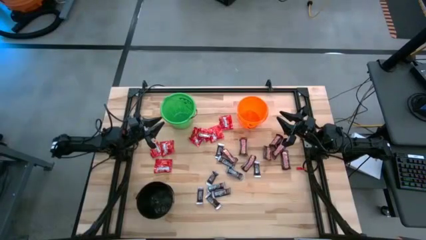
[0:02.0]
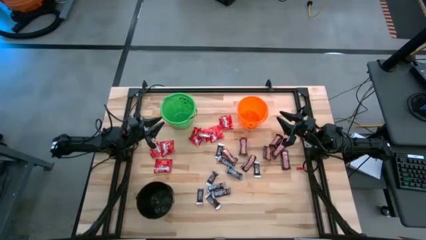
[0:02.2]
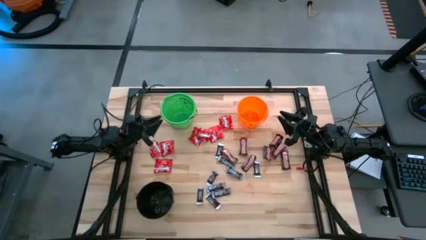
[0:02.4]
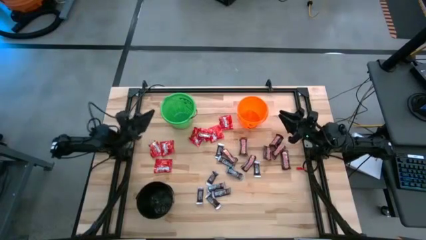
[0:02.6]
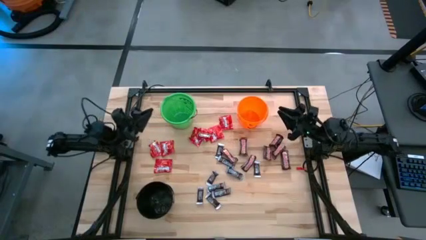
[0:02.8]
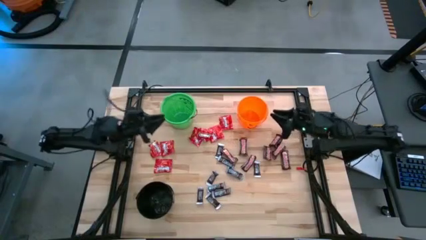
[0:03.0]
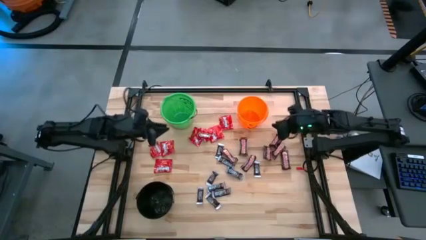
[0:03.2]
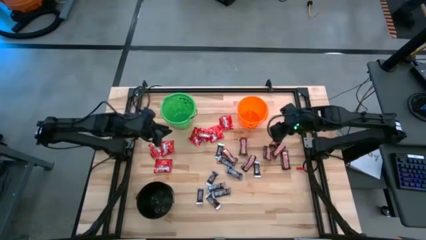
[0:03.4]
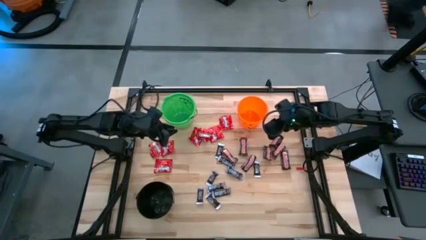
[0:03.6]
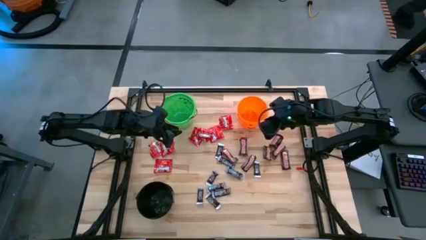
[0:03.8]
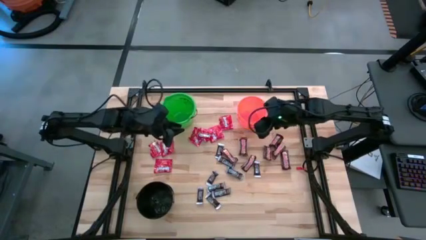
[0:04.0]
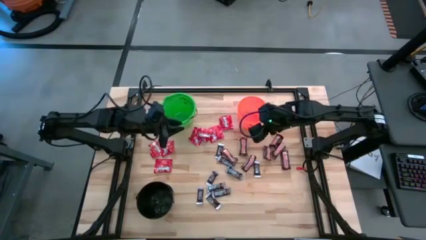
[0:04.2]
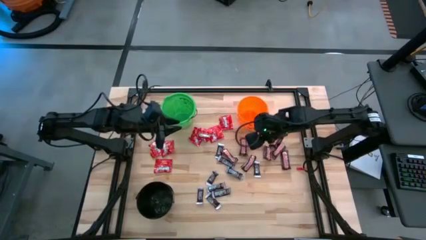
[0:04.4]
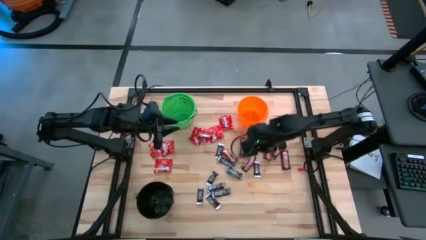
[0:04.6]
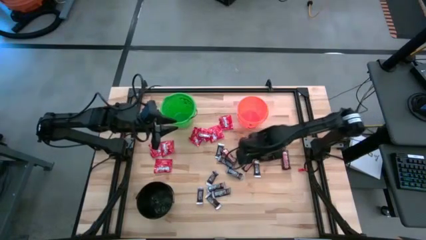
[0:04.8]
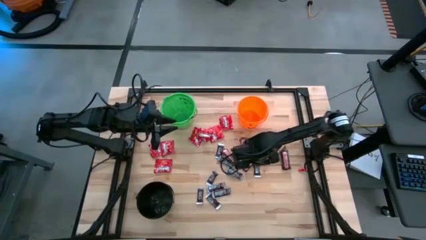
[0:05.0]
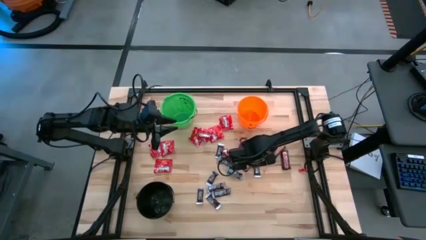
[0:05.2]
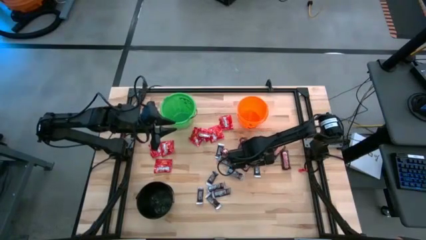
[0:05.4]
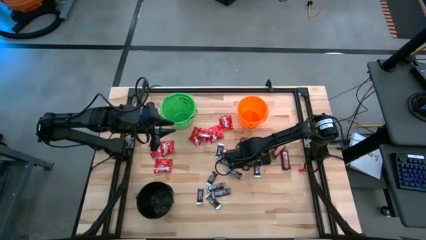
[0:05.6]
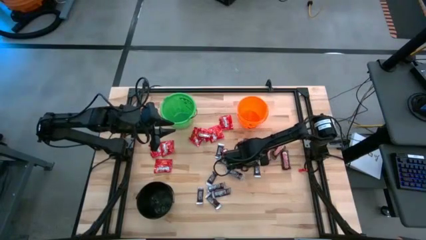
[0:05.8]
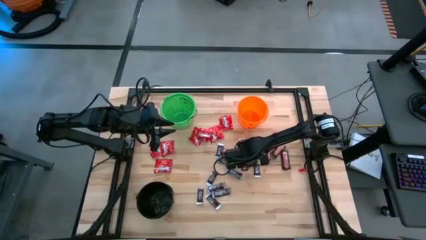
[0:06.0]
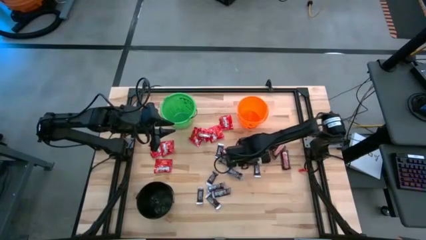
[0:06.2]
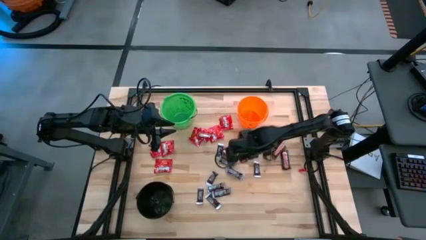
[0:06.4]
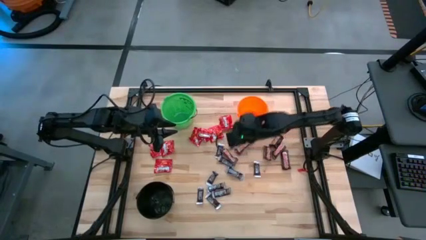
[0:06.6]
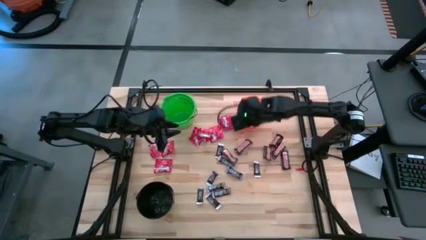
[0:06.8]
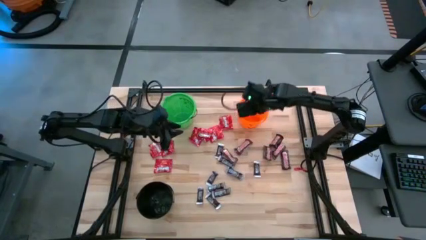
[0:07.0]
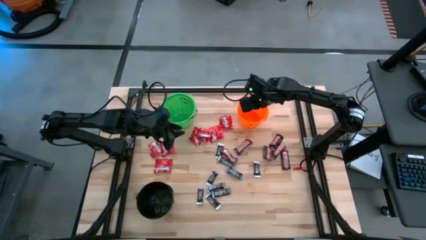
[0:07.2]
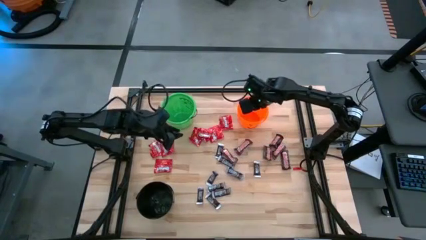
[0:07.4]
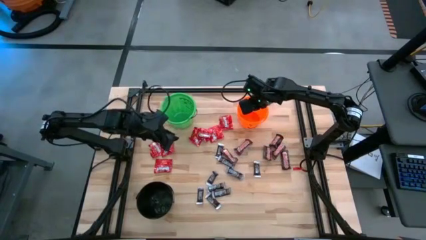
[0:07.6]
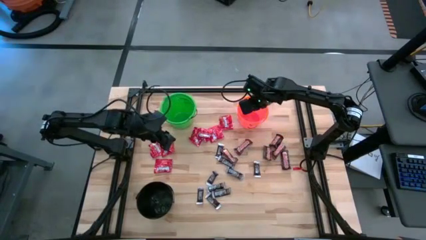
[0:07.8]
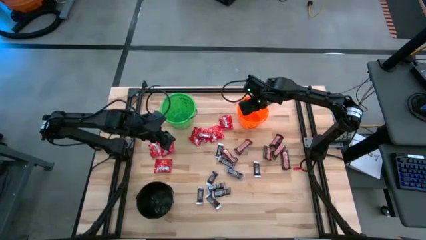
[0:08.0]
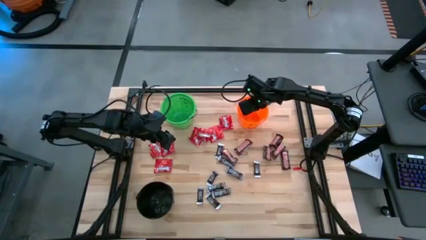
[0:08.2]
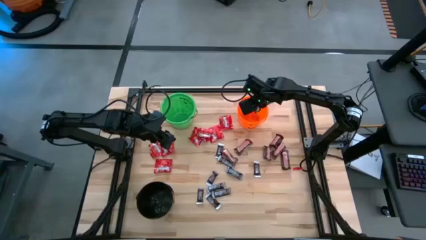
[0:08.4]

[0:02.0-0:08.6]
Task: Sort candy
Put the brown chocolate into the orange bucket

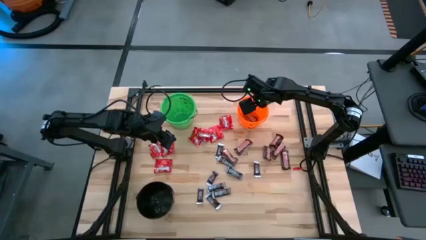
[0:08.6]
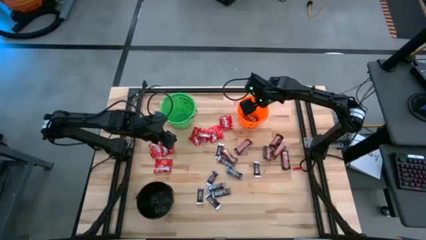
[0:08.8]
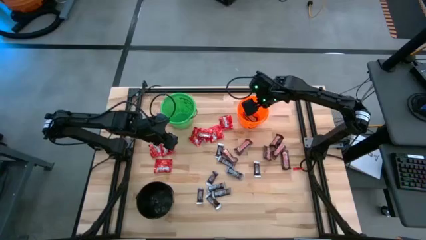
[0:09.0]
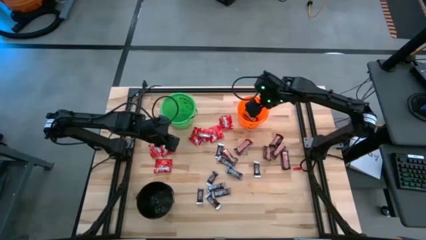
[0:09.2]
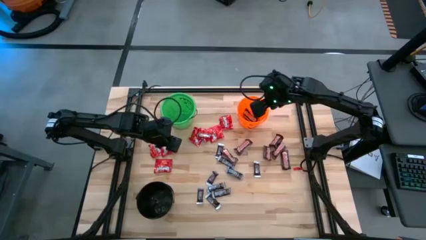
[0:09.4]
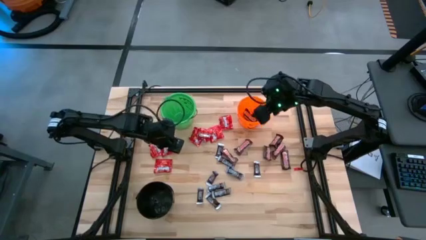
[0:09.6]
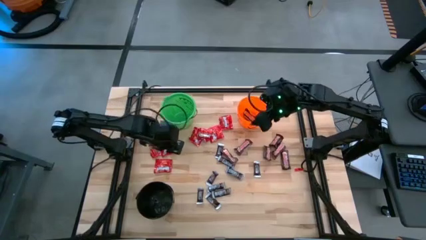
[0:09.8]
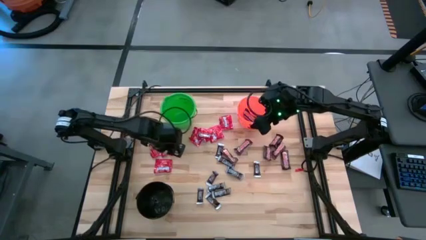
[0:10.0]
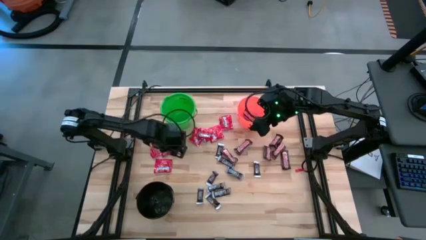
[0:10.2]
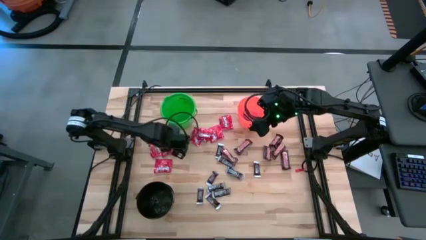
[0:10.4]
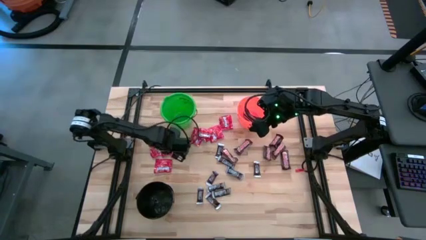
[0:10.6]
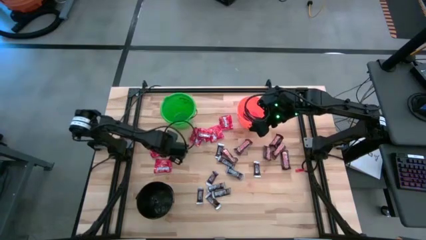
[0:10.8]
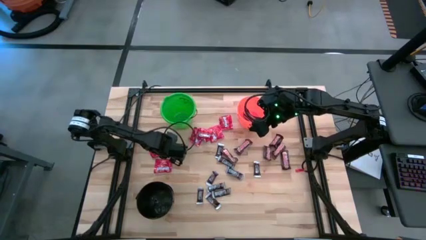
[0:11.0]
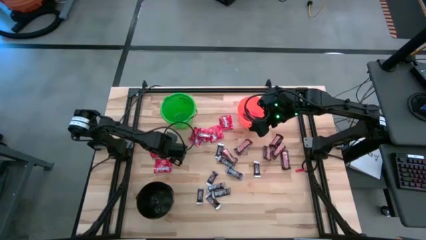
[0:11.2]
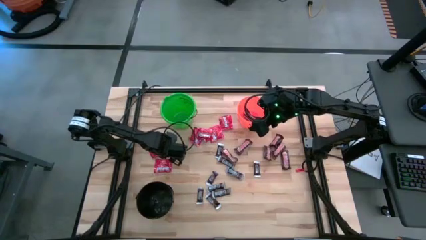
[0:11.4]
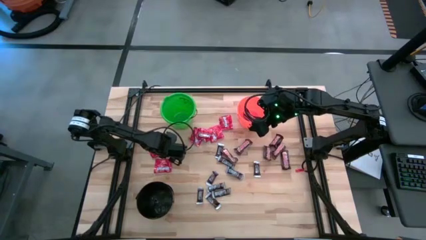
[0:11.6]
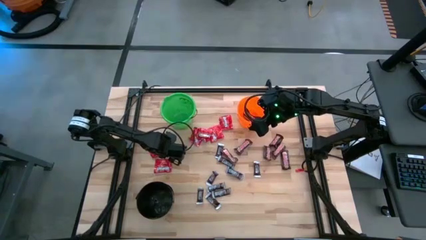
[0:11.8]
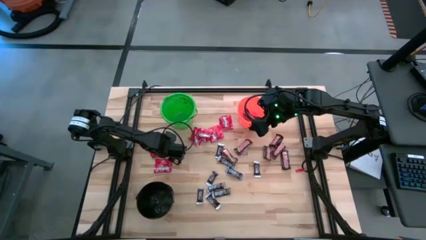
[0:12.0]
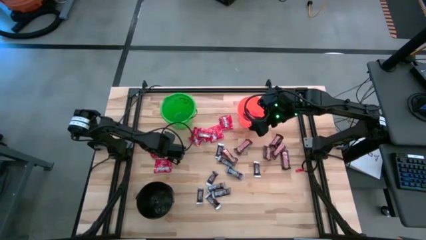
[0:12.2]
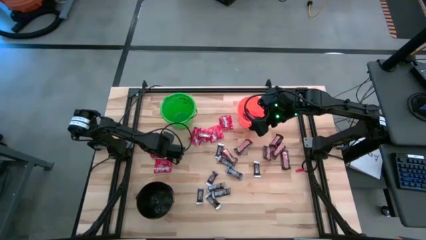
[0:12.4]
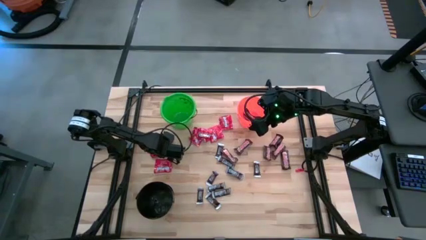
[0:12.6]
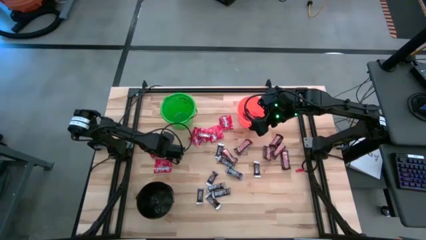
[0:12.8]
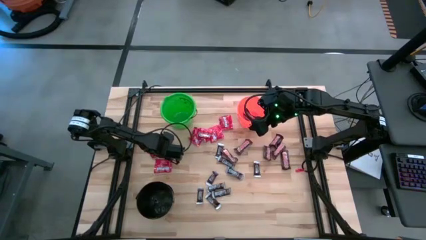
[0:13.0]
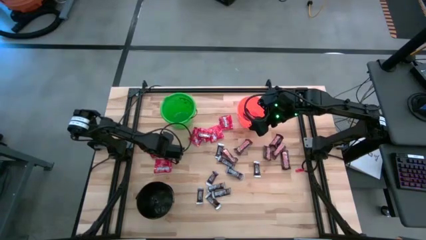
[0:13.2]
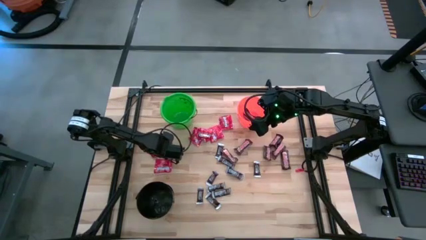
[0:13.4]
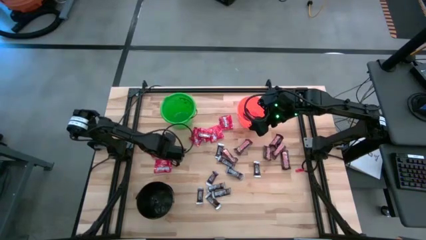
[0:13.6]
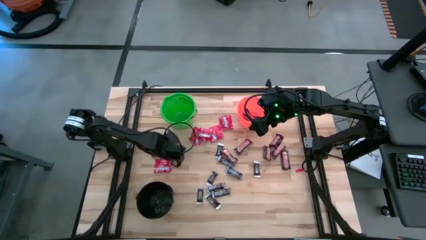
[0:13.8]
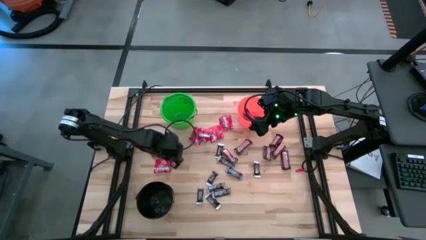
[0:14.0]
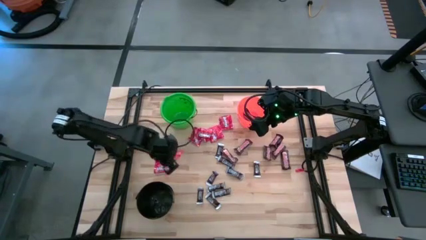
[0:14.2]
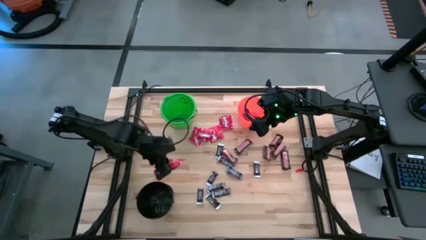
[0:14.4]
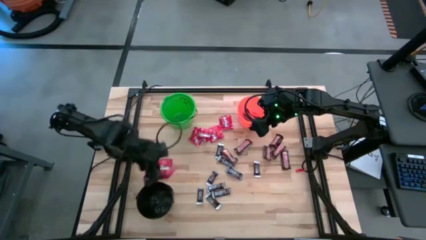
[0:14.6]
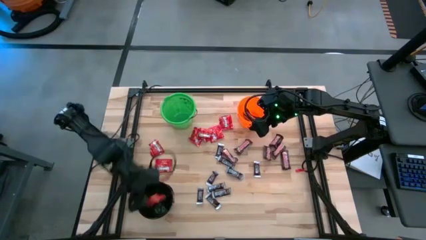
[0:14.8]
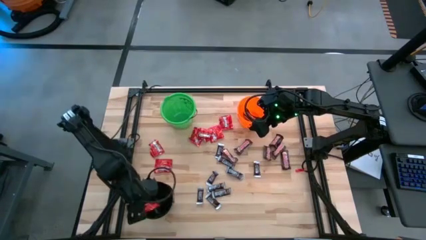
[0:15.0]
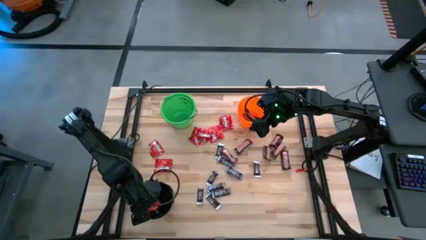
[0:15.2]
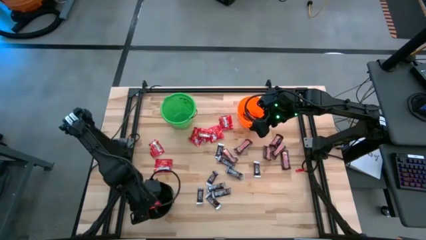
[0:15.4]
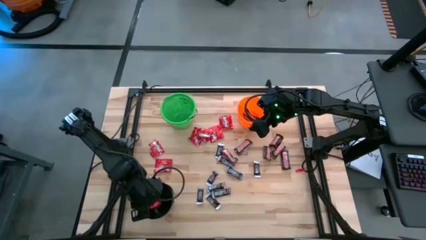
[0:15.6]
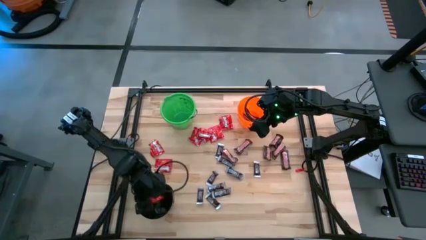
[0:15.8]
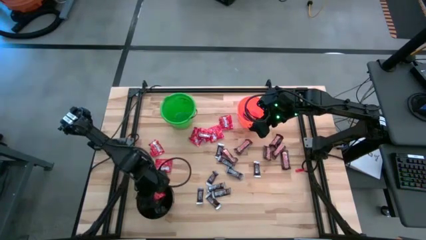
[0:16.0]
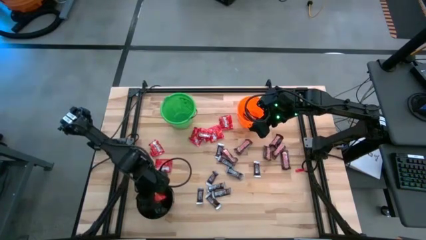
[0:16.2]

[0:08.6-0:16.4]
Put the red candy into the black bucket

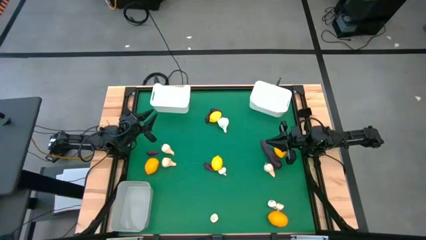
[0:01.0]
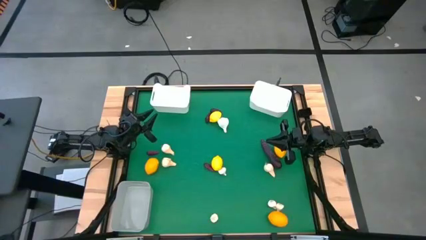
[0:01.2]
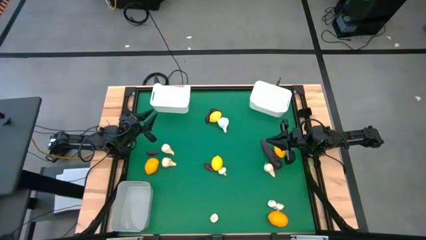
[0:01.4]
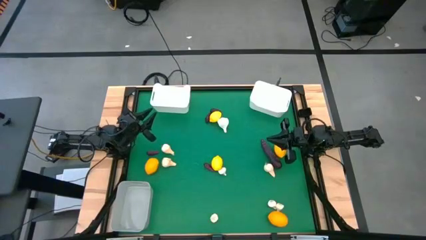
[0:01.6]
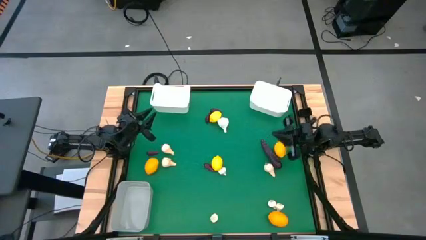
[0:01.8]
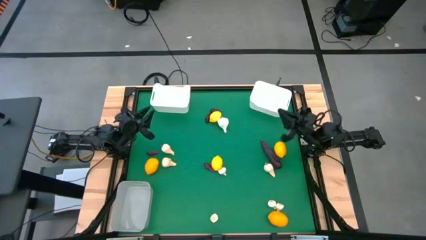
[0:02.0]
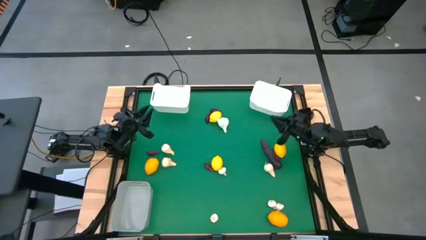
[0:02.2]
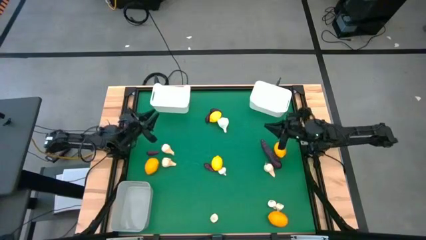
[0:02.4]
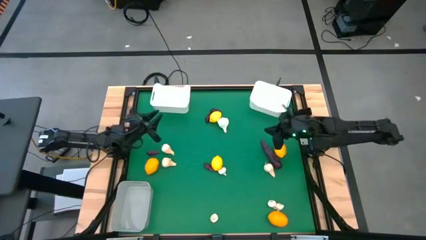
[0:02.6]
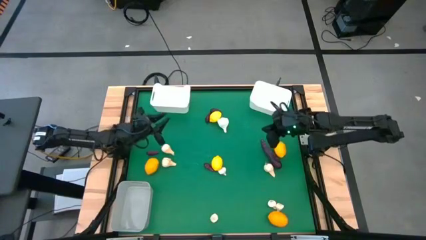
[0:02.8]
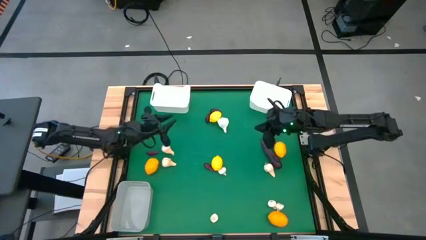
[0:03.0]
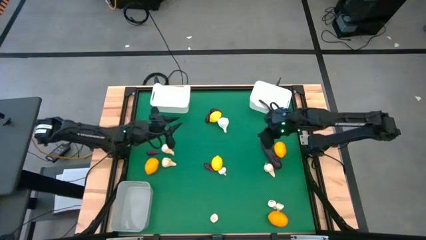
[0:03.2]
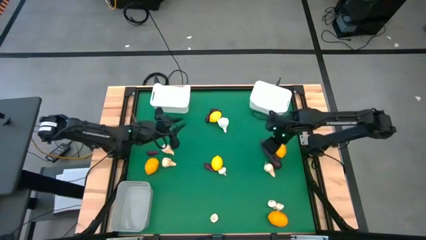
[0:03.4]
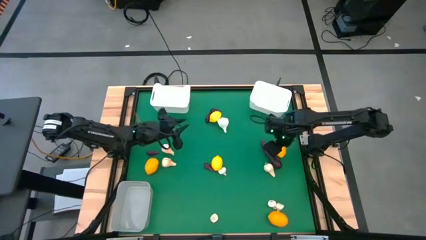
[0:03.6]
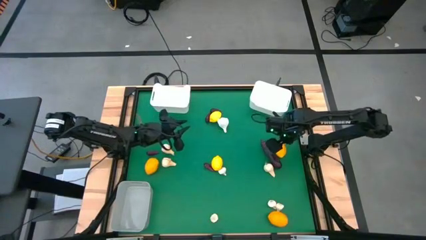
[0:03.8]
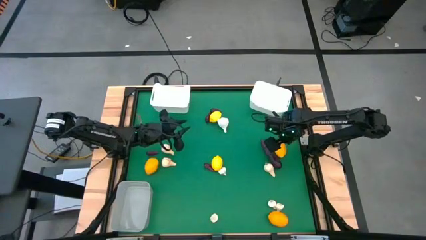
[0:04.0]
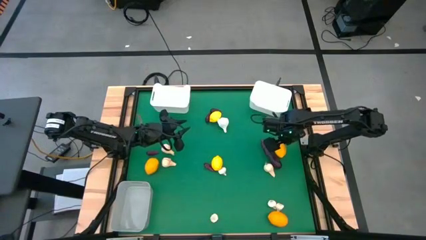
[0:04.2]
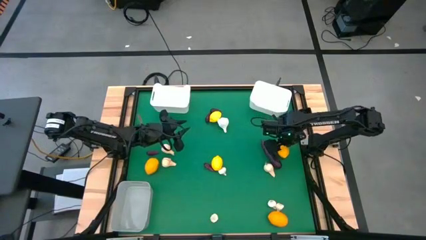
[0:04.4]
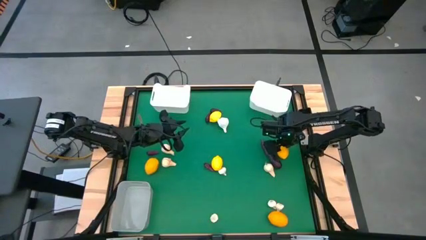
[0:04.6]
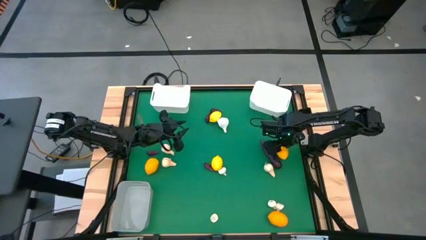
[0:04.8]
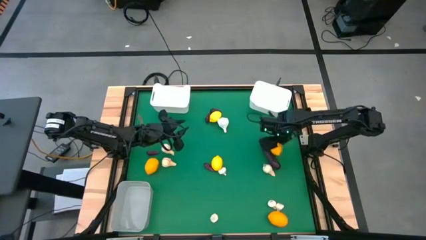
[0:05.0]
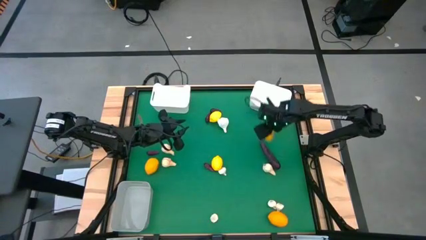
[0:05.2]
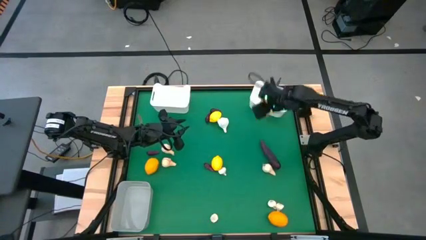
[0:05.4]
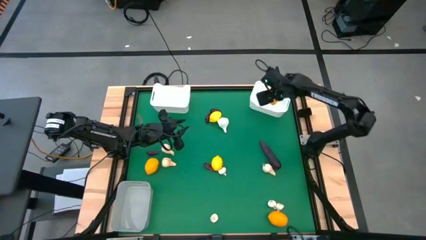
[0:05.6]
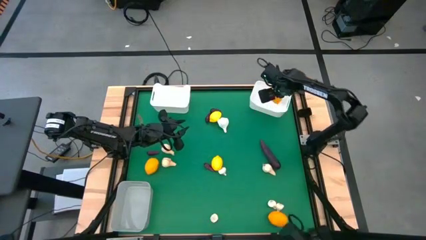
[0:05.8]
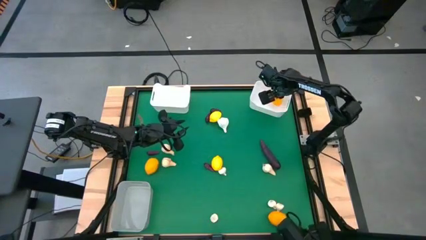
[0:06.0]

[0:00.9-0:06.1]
Task: Sort produce into baskets
Put the middle right yellow lemon into the right white bin
